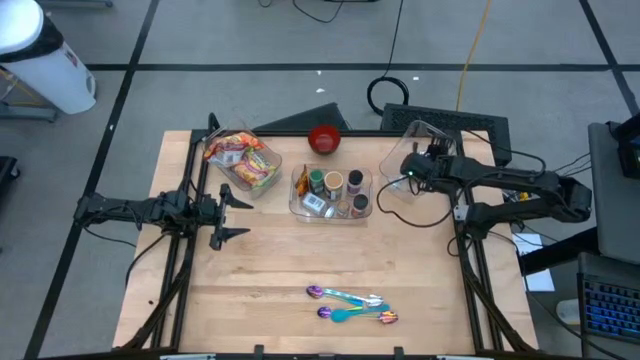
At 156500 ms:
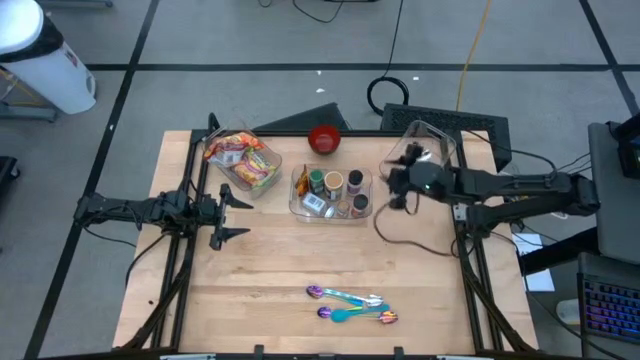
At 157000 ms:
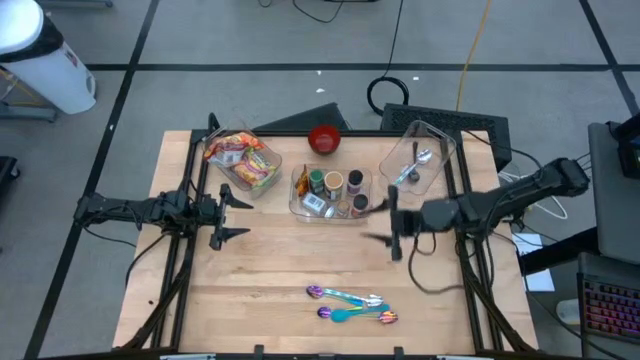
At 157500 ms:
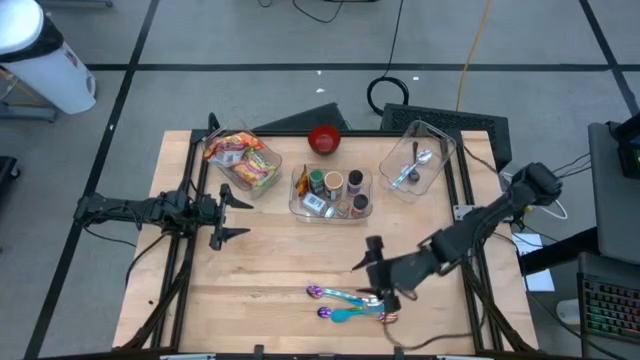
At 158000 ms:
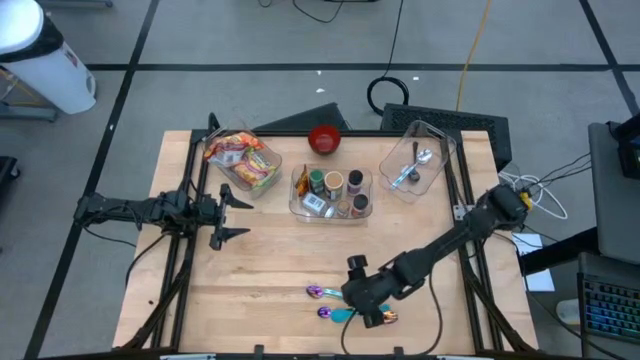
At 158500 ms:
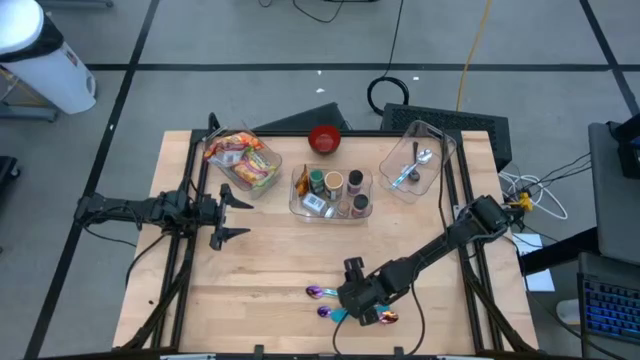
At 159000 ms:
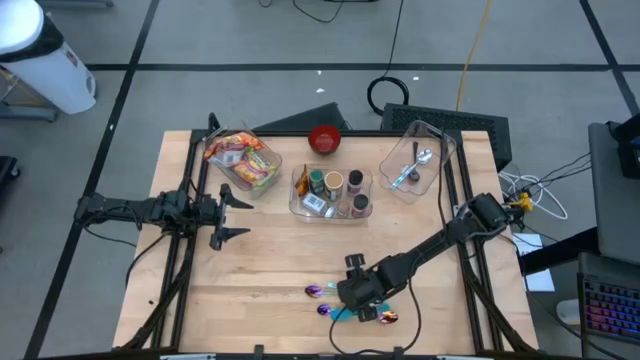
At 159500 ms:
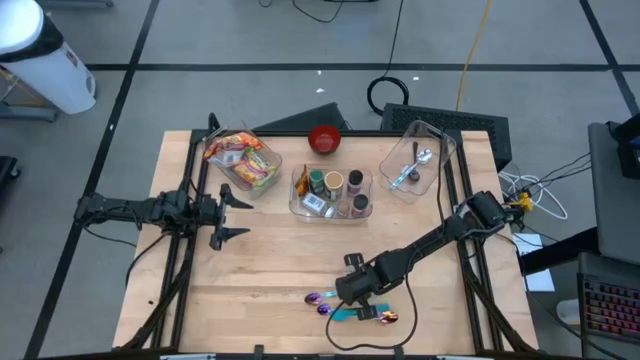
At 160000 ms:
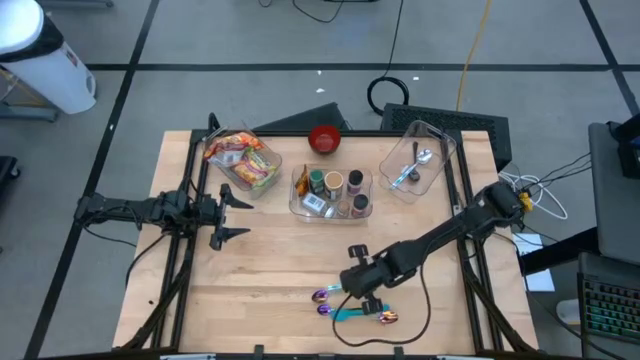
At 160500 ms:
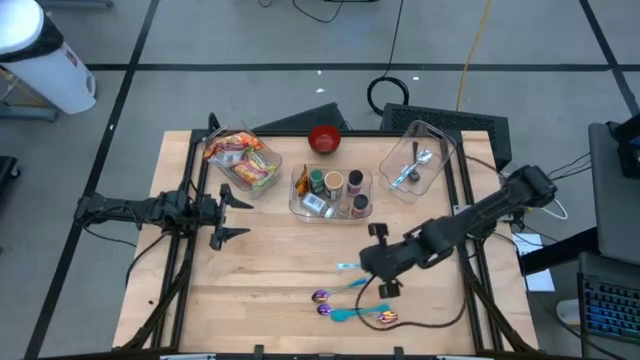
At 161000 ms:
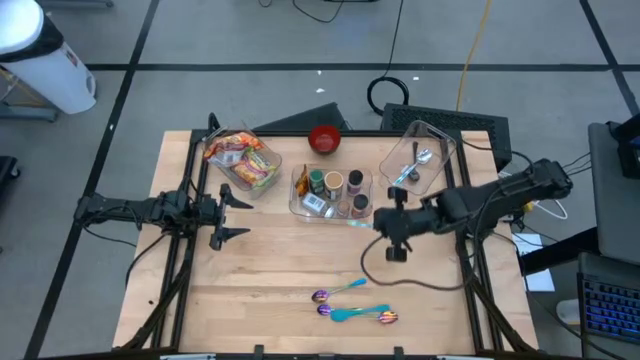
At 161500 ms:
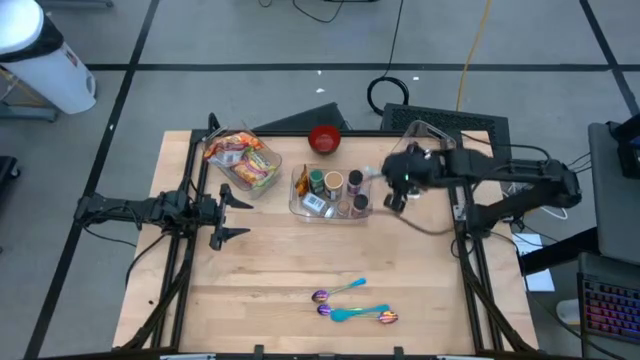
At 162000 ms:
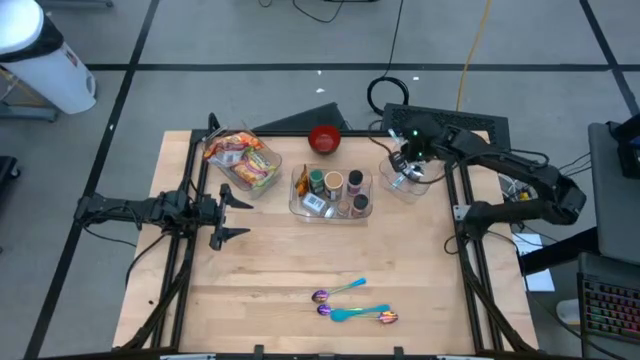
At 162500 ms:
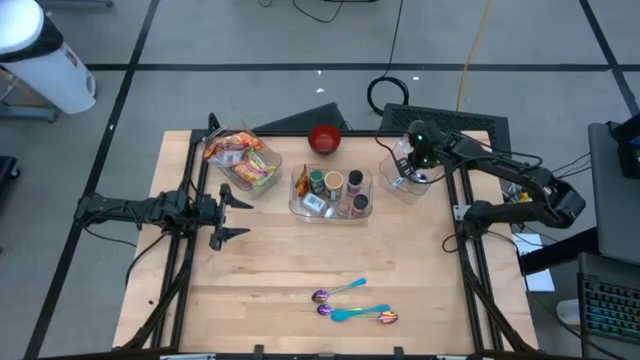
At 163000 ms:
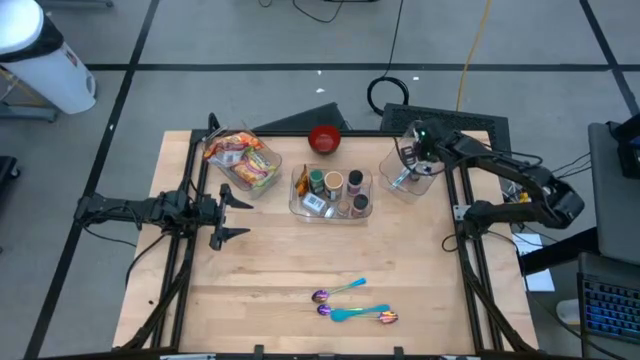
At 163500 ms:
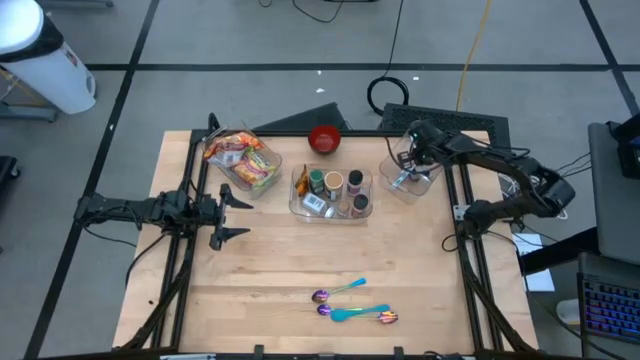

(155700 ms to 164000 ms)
Task: Pick & Place Food Item
Put the silver spoon into the right transparent bin

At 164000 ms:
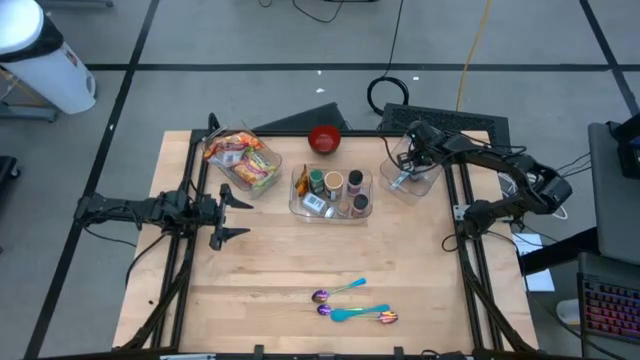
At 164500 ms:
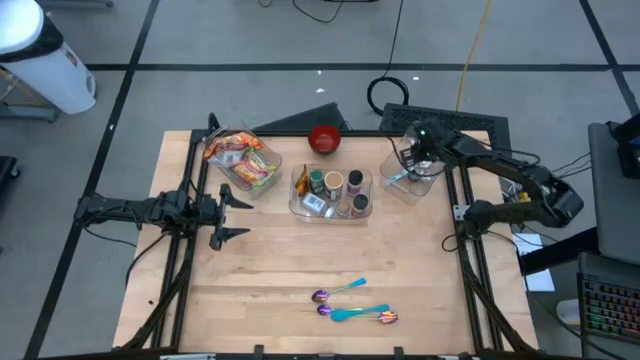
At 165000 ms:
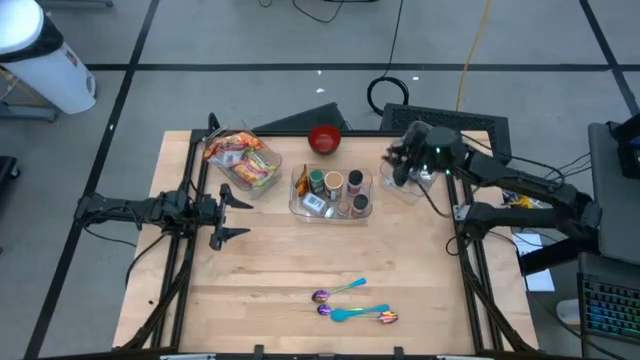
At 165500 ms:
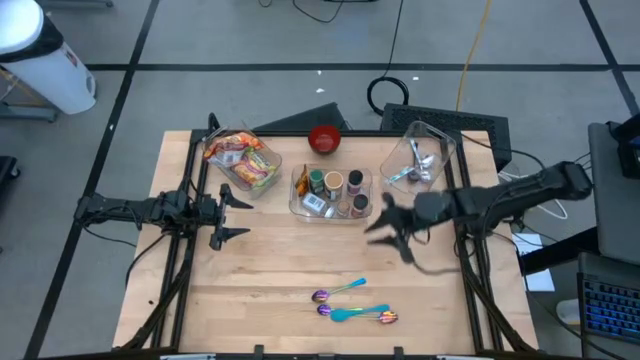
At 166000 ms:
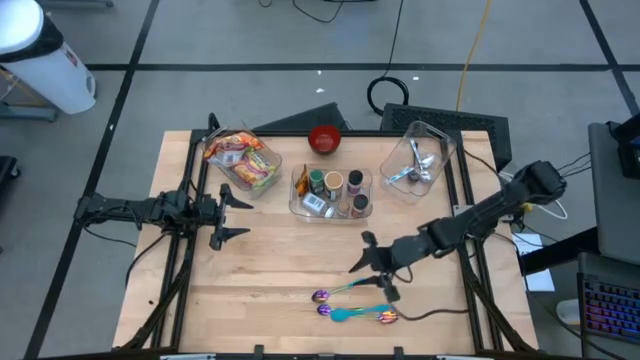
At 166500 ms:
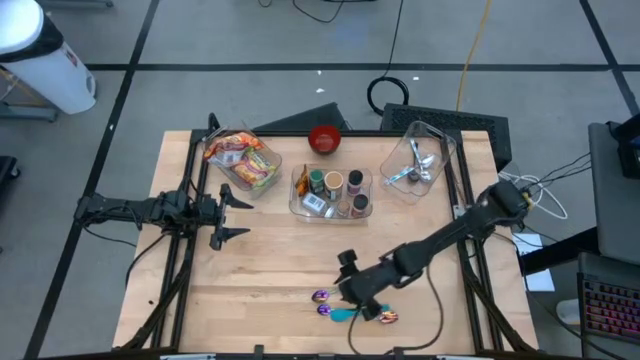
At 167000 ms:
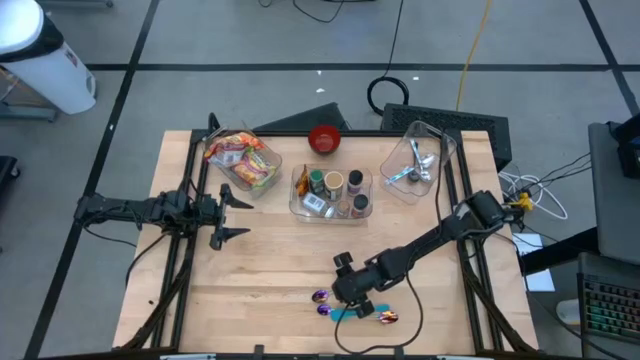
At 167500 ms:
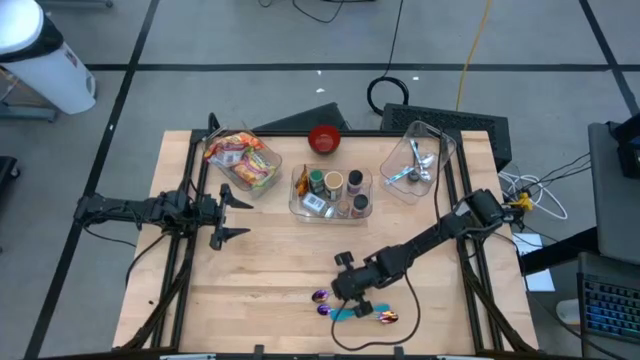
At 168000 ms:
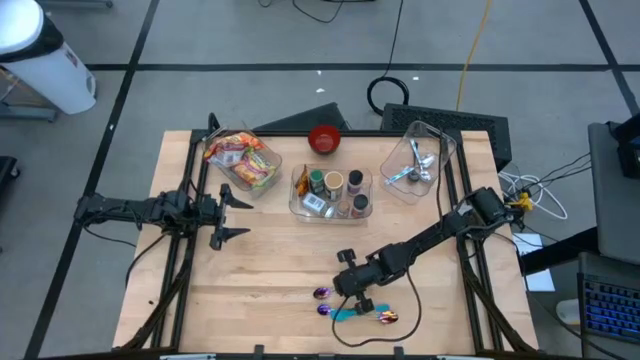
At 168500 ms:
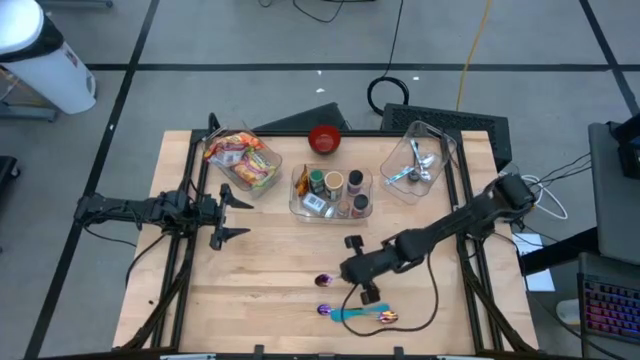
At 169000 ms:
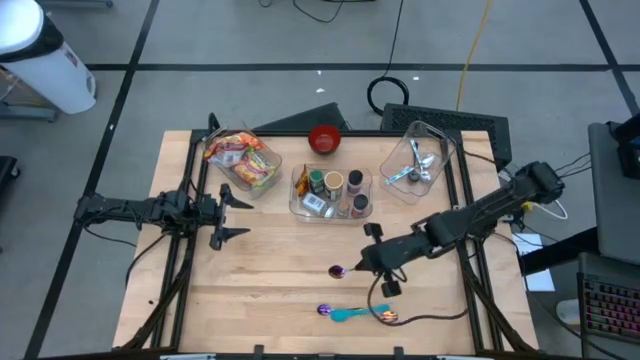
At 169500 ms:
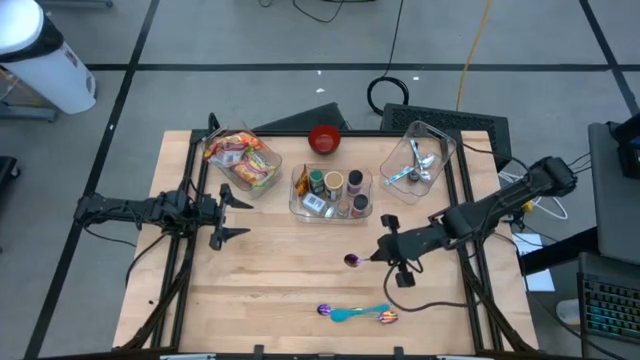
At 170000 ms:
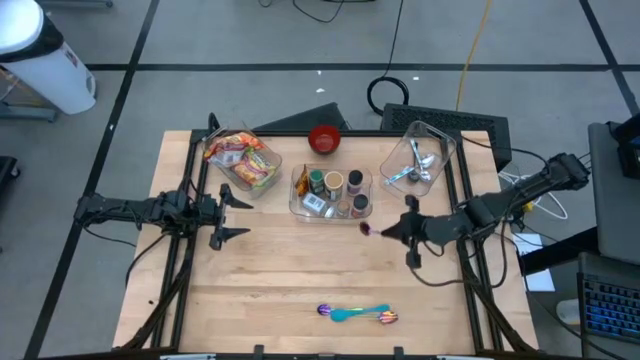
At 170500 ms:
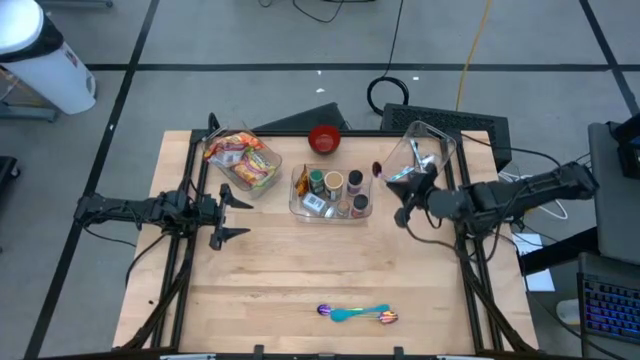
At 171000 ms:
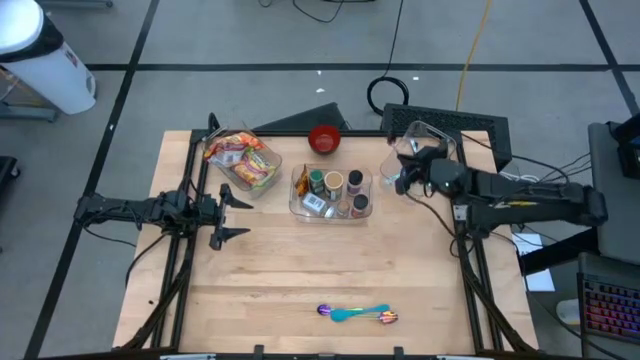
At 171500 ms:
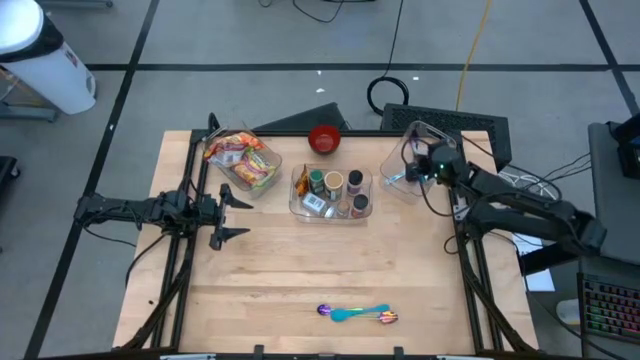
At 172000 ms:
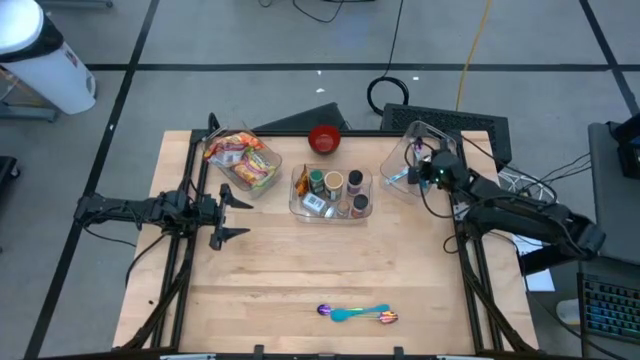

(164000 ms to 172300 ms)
Put the top violet spoon into the right transparent bin

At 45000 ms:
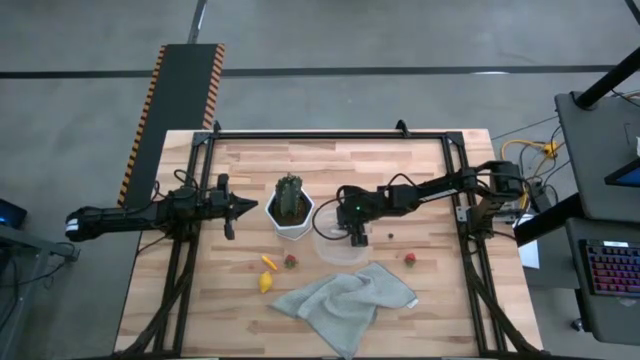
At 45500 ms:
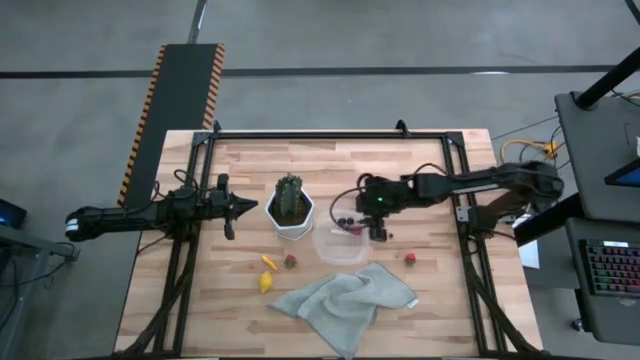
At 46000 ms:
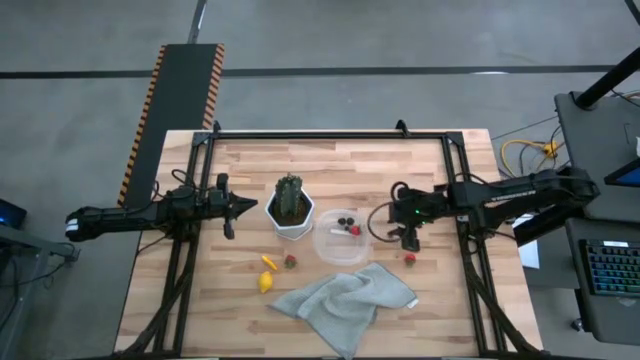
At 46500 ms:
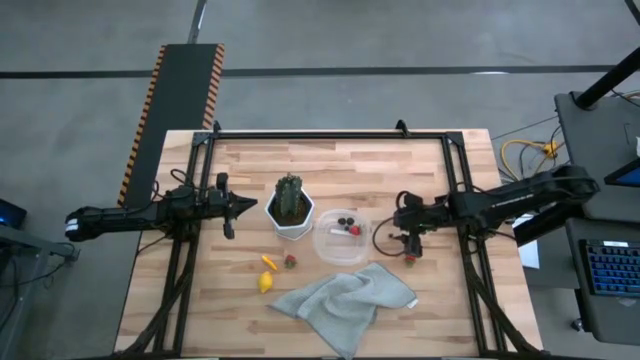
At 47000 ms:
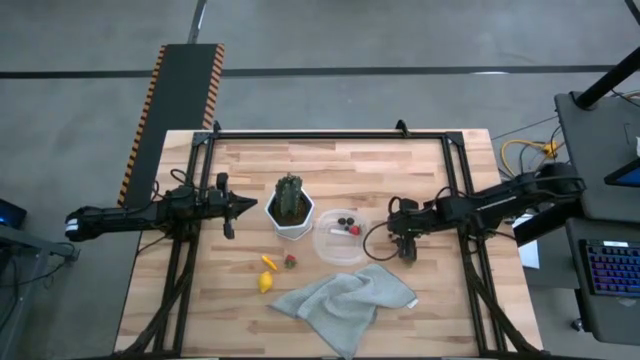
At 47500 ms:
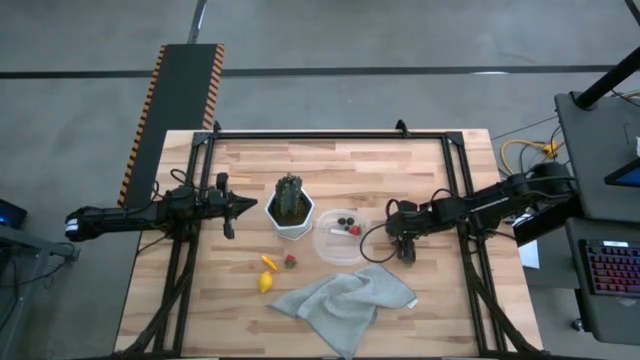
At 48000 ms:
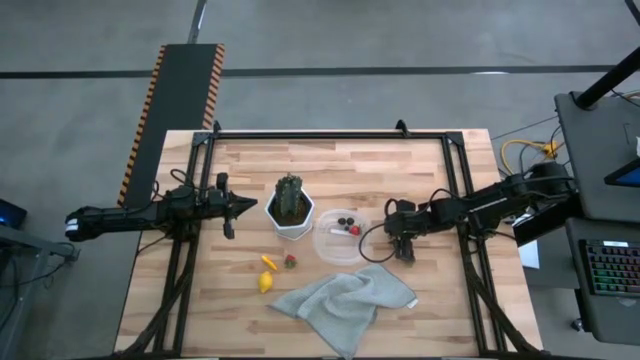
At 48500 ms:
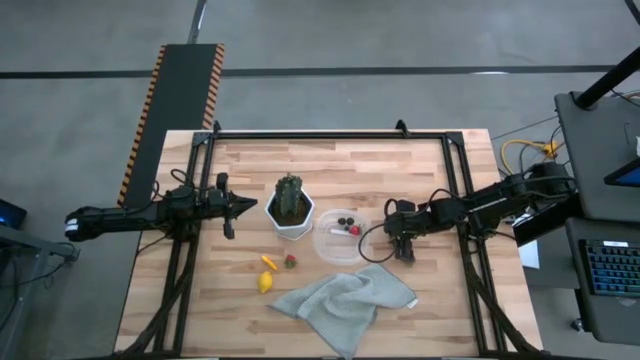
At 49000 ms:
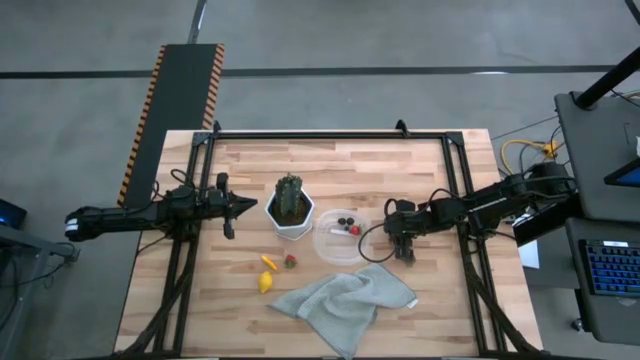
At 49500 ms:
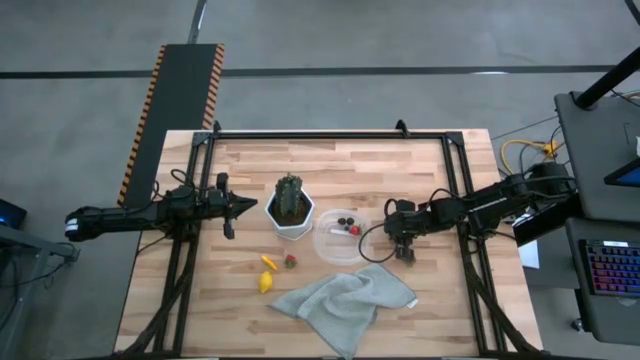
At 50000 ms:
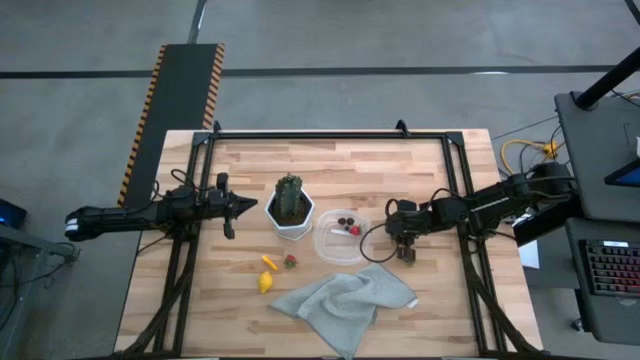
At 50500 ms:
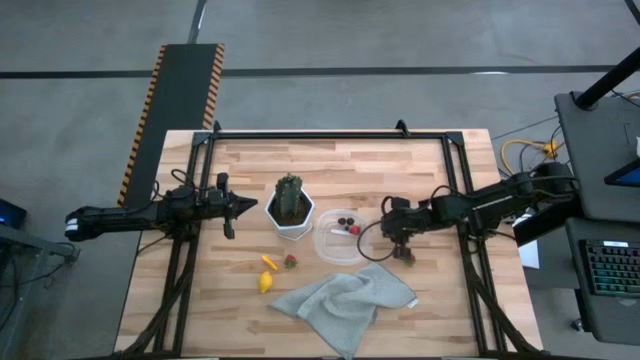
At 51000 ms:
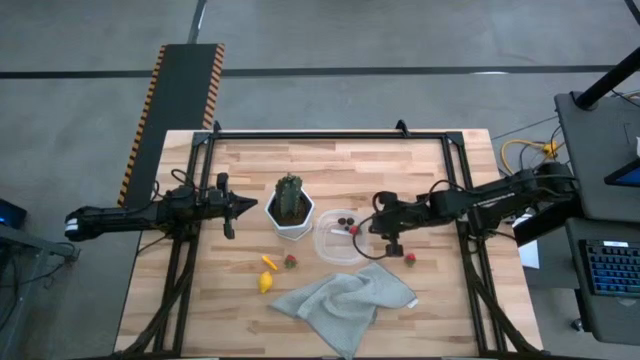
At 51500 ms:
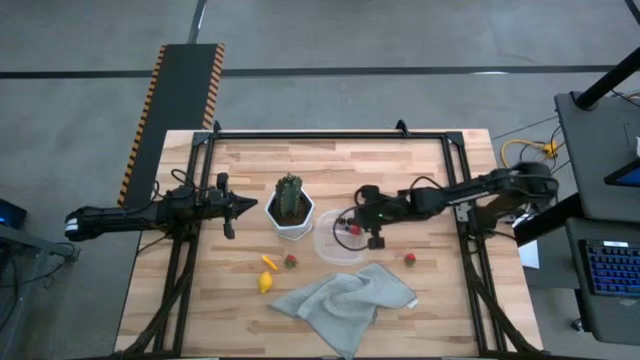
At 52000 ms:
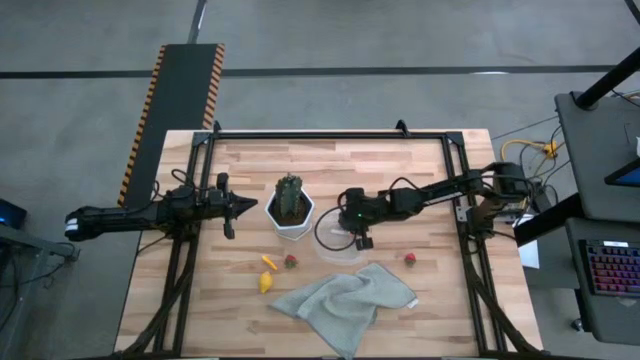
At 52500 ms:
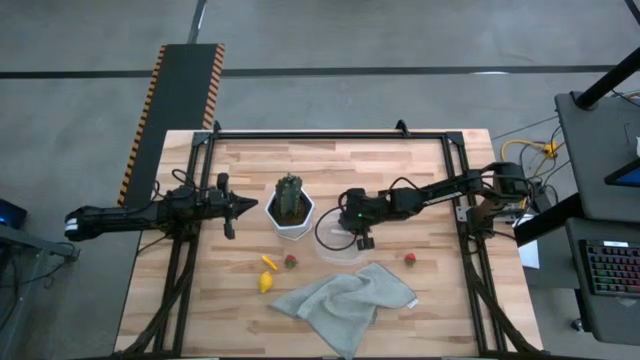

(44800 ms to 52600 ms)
Task: Pick and placing Produce into tupperware
Put the blueberry into the transparent bin
